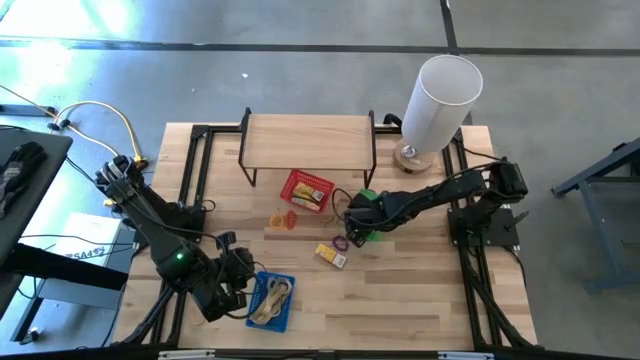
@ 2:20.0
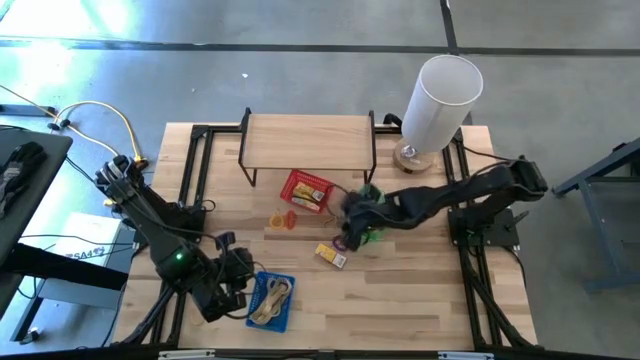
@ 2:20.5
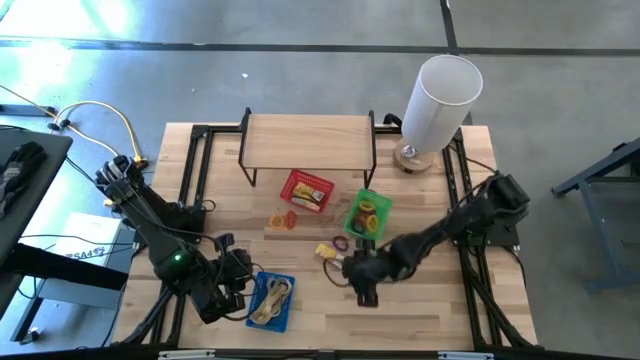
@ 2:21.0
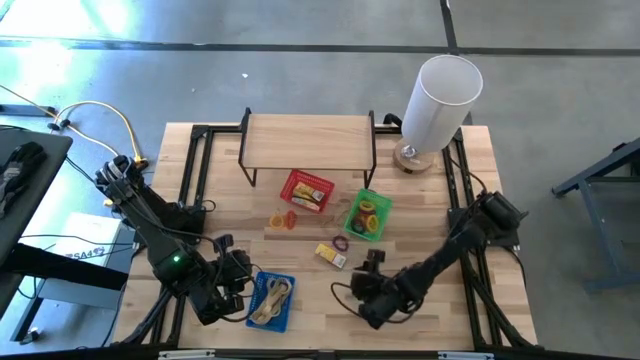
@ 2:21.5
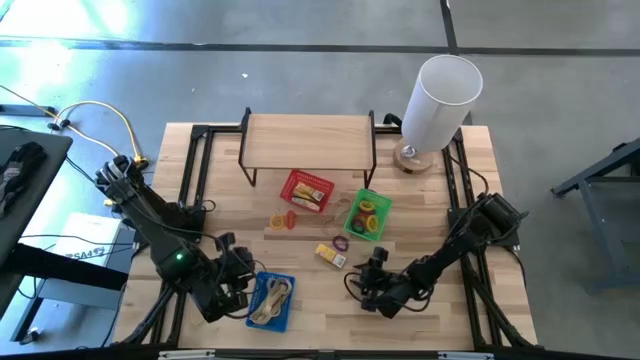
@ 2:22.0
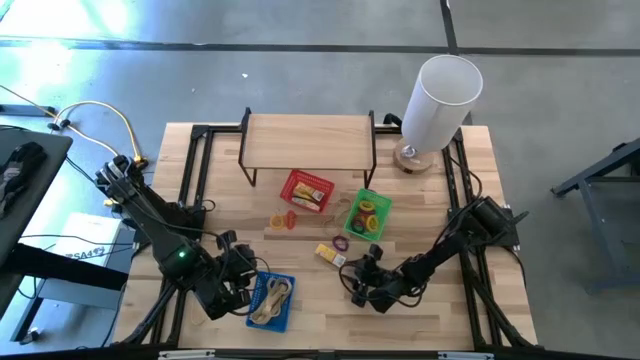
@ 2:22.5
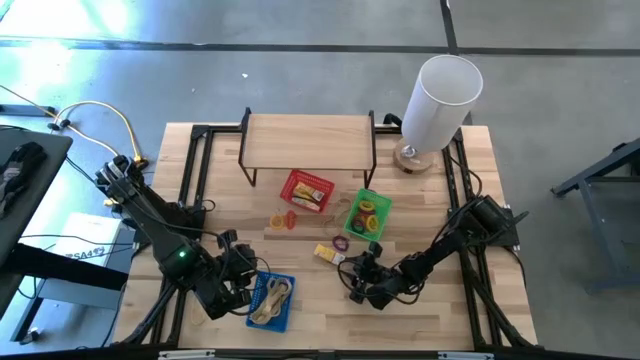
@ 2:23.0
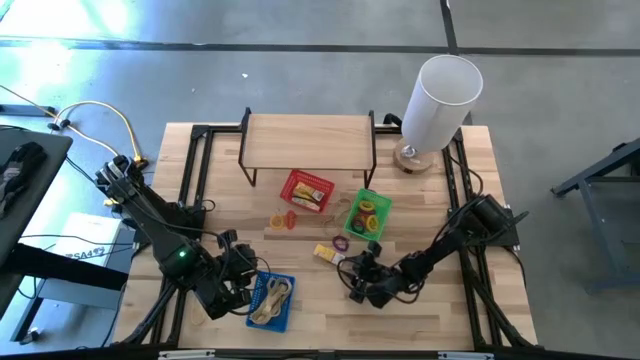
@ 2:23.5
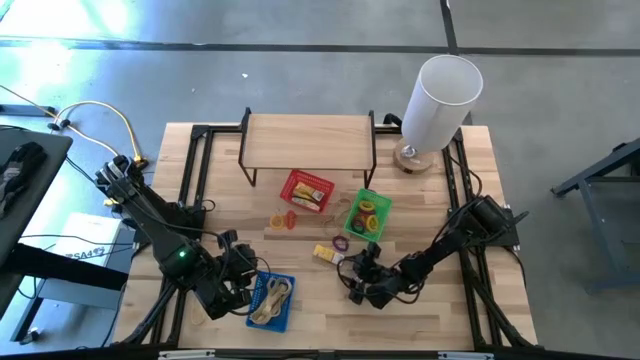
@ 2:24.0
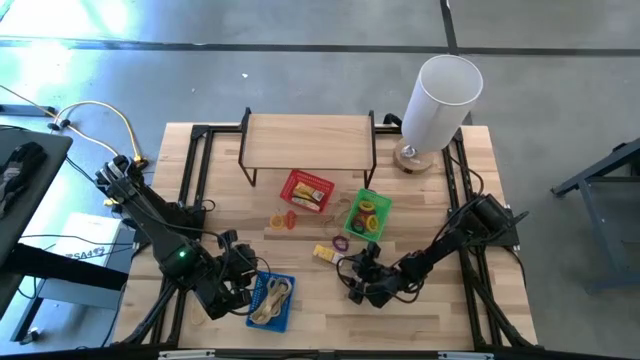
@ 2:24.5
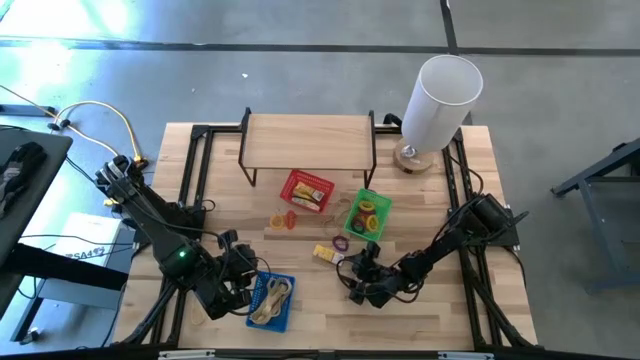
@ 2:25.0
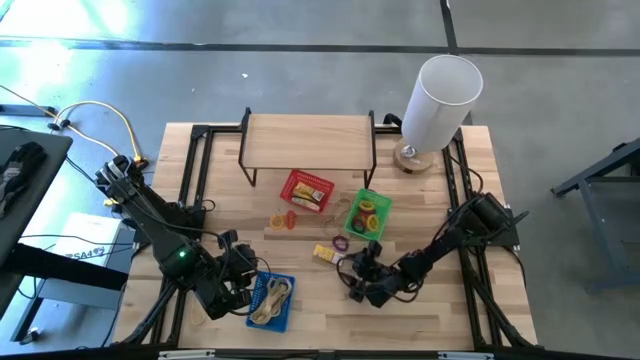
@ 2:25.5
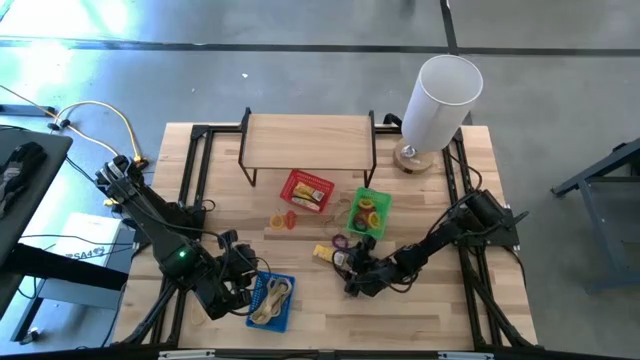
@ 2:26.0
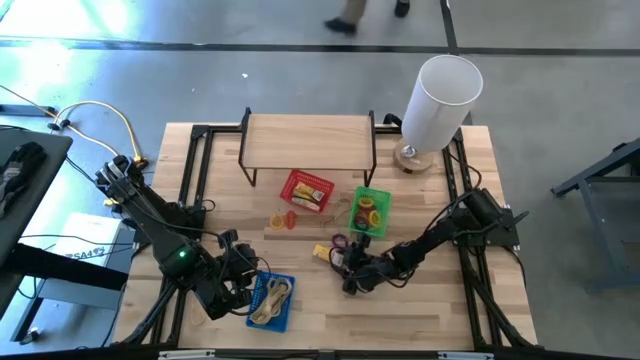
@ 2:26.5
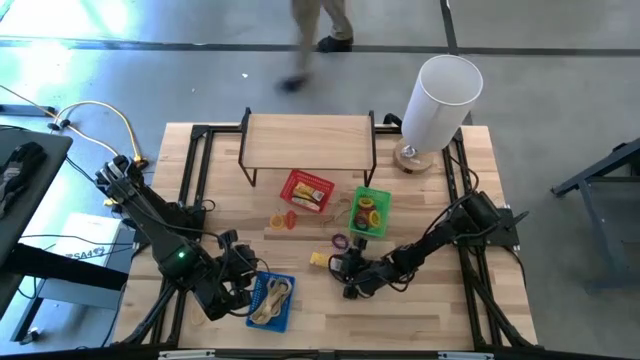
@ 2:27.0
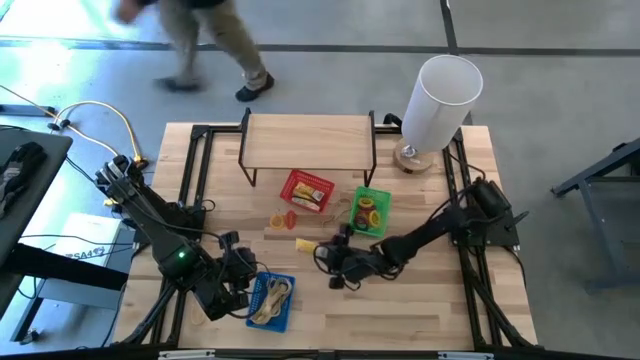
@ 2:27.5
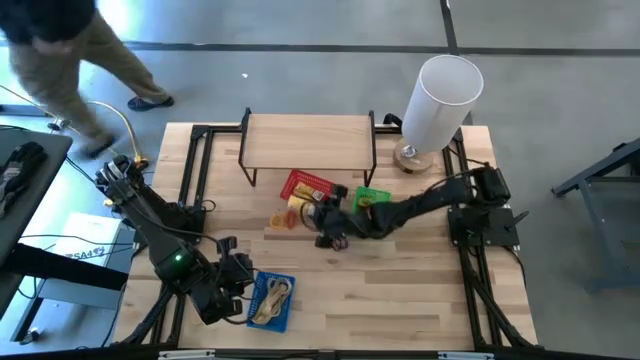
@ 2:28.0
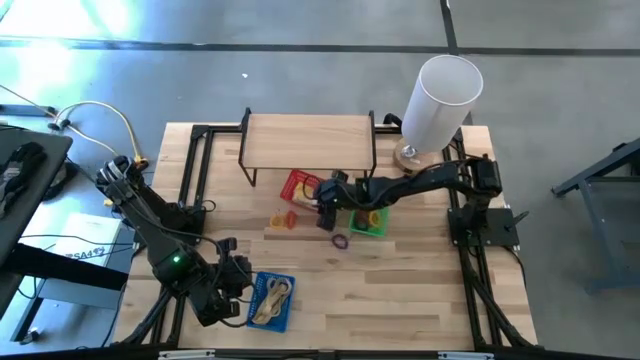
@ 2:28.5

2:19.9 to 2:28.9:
Task: Pick & Place Office Desk Supplies
Put the yellow crayon box into the red bin

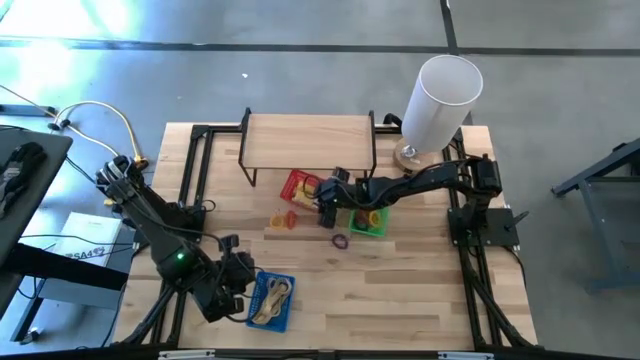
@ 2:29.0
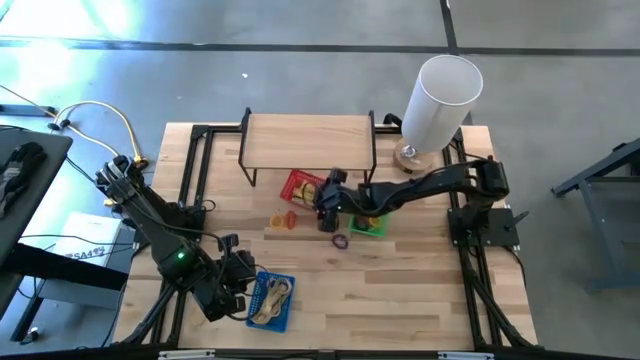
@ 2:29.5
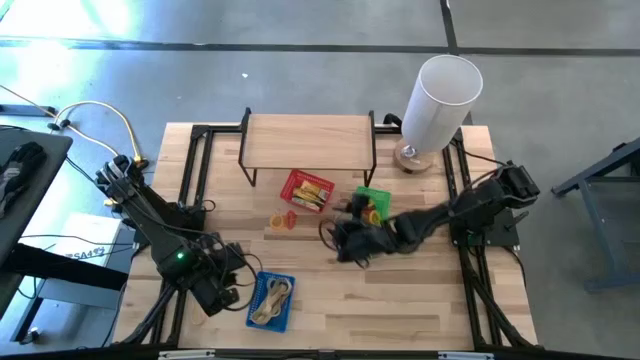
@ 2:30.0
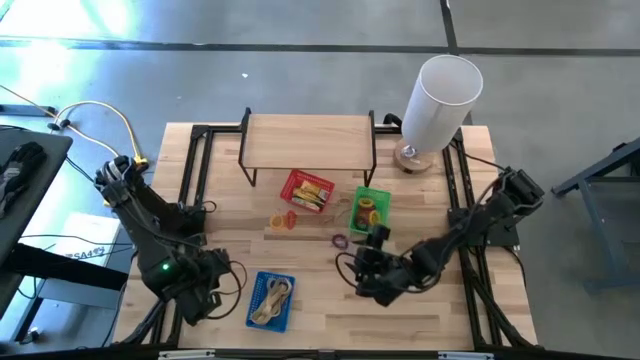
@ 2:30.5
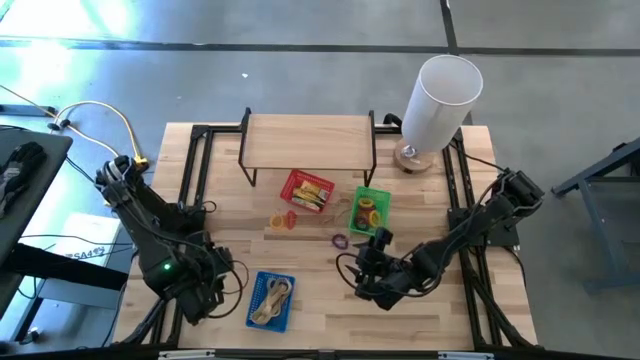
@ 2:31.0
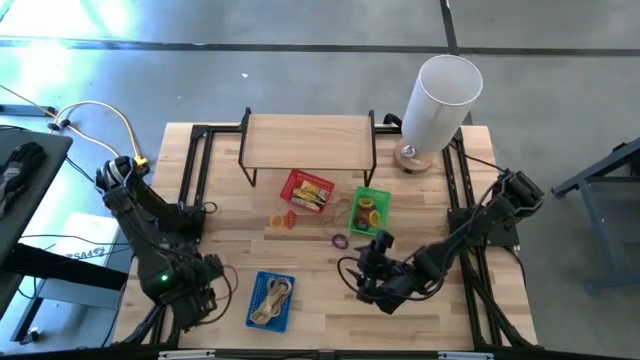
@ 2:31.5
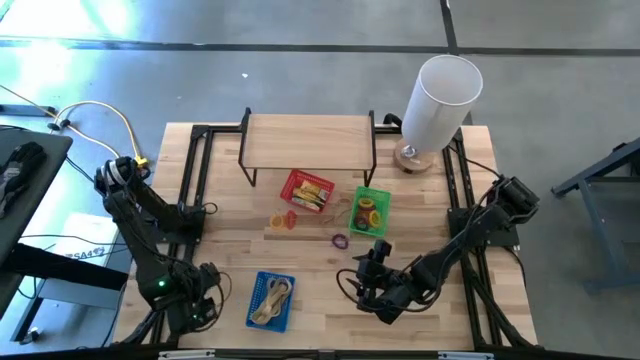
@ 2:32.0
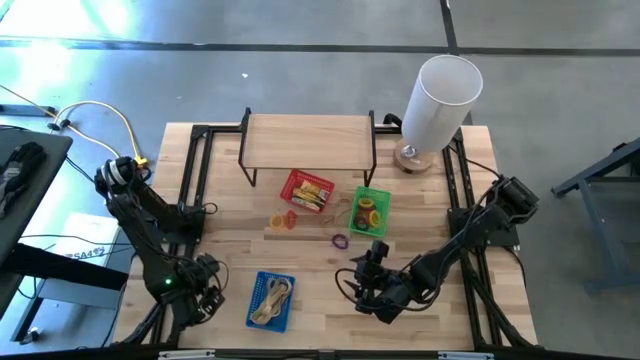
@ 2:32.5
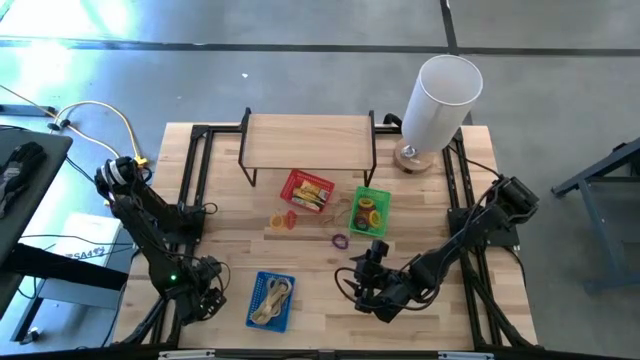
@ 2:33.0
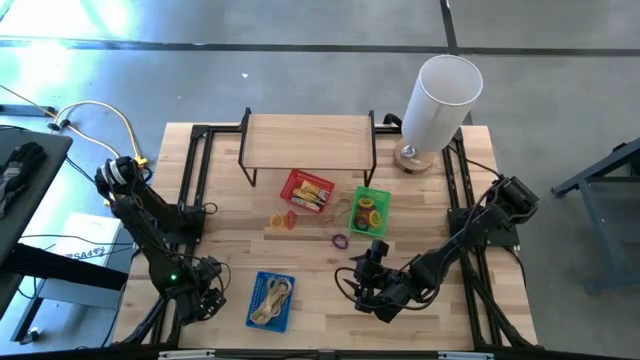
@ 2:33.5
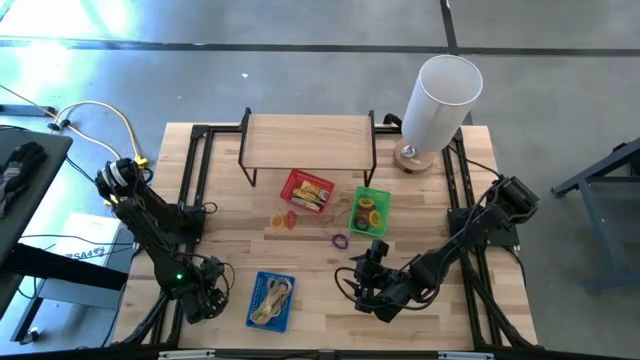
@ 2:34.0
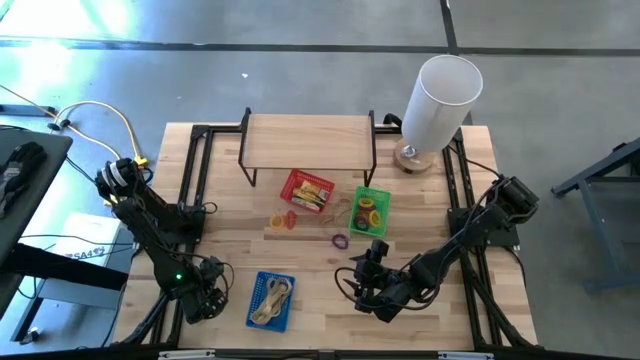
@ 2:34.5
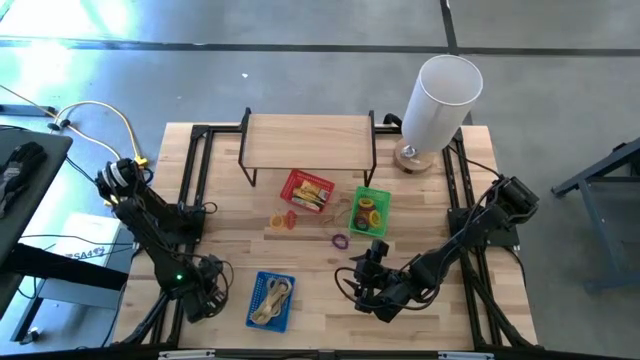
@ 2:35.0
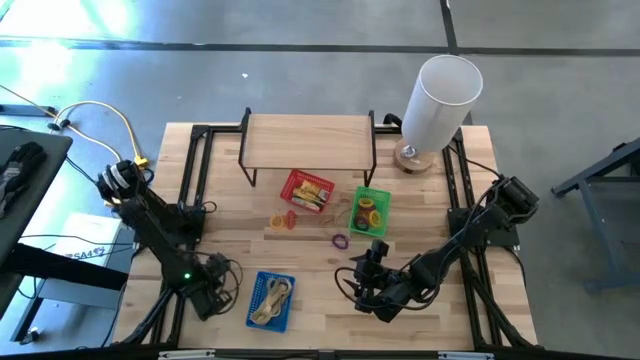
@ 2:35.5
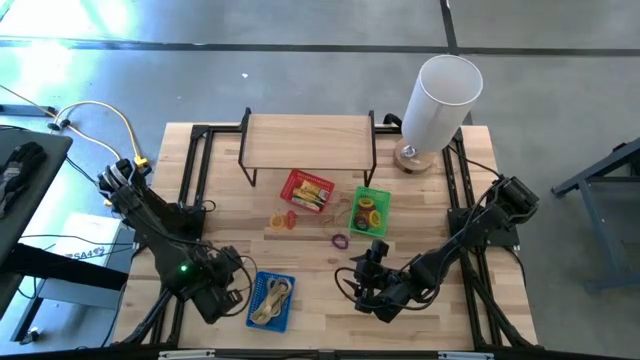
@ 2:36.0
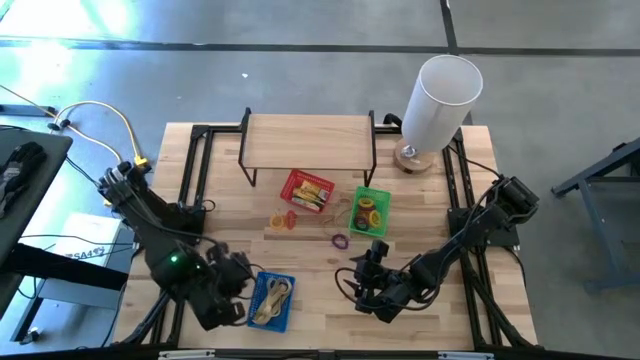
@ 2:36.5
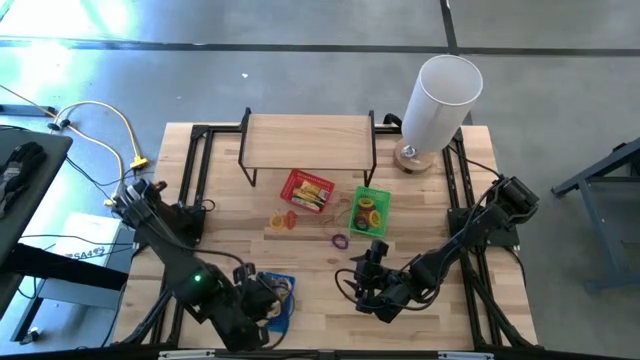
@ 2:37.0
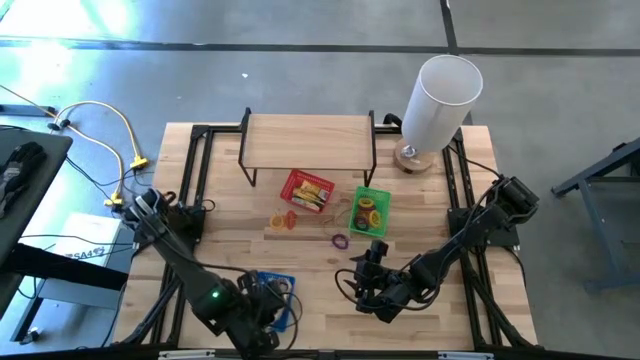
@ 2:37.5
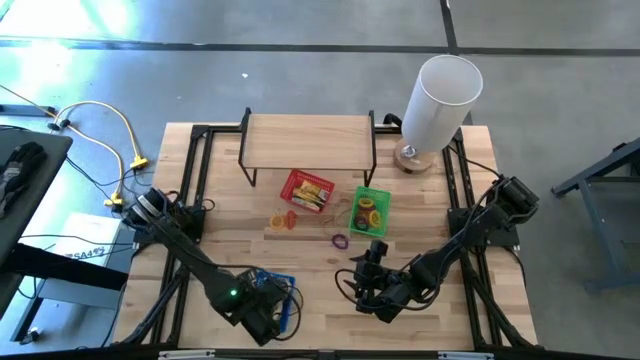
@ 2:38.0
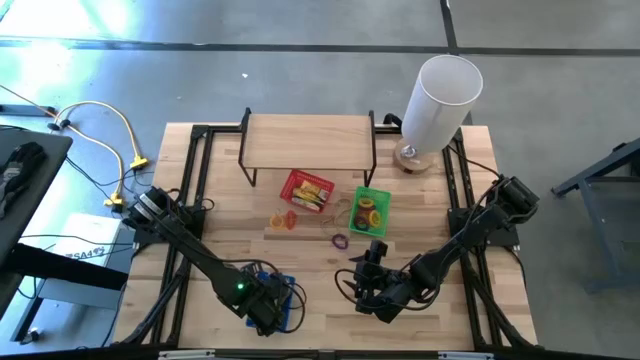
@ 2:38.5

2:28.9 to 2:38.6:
Put the brown rubber band into the blue bin

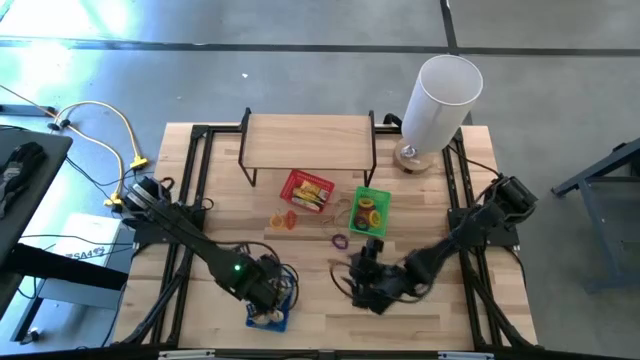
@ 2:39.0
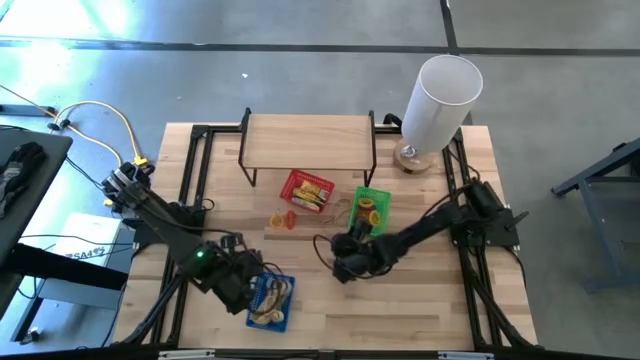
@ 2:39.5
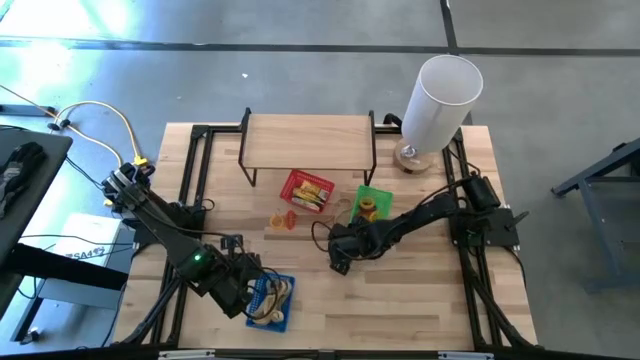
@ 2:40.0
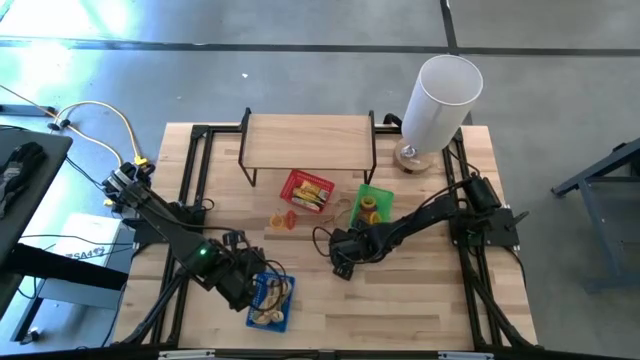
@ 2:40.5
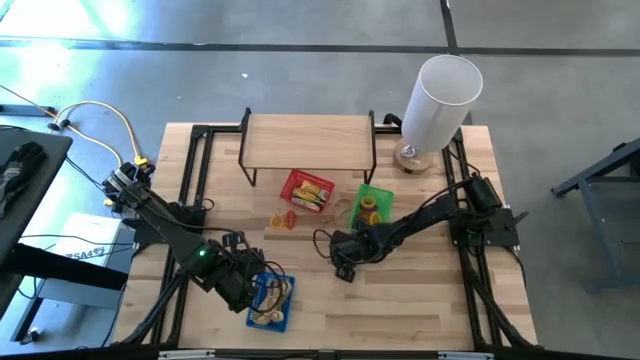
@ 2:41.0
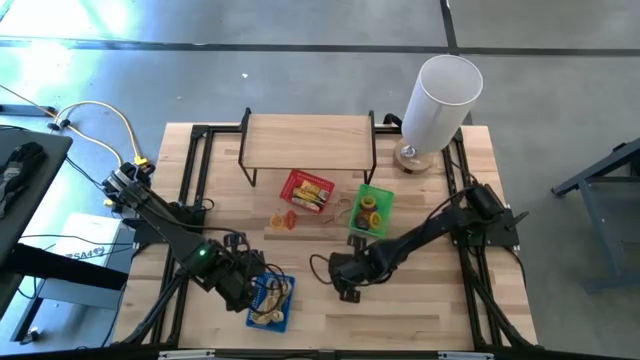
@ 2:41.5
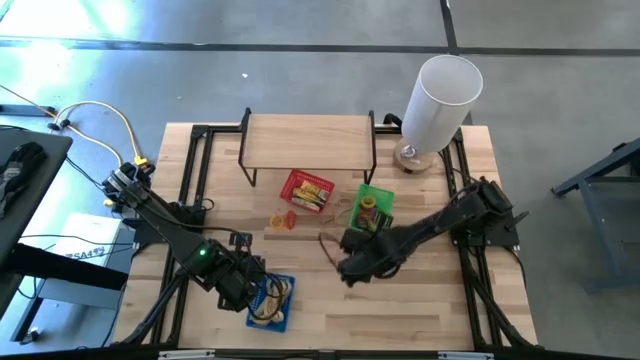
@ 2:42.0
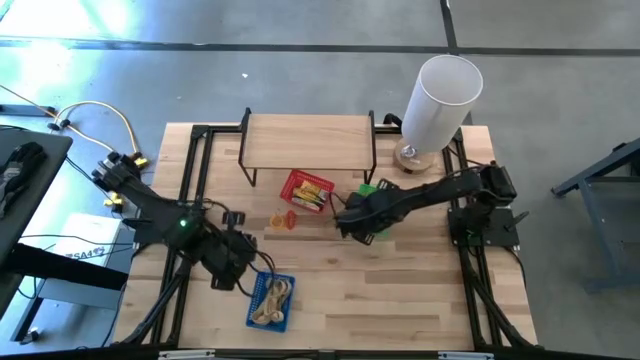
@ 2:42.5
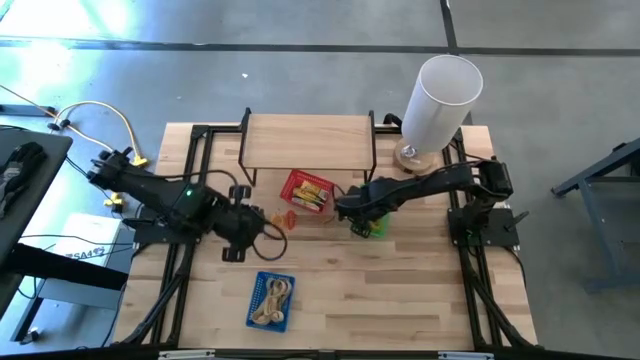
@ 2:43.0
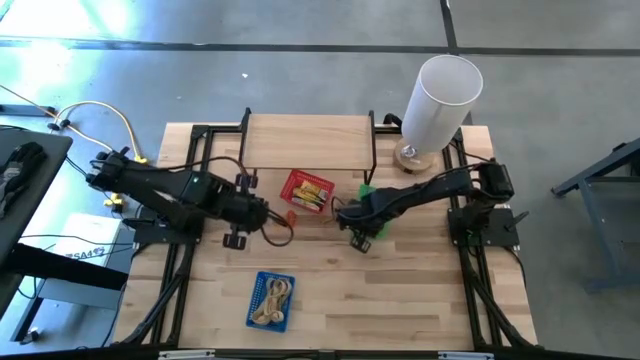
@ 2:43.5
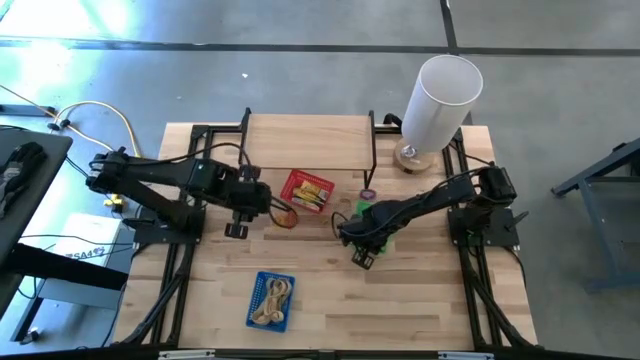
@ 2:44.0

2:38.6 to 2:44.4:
Put the violet spring keychain into the green bin
